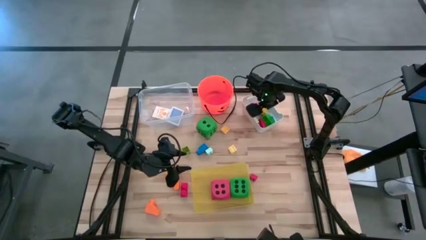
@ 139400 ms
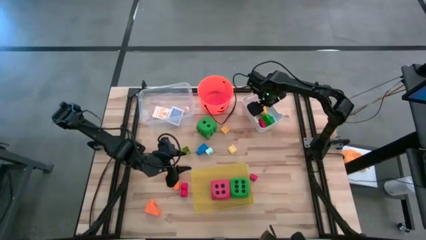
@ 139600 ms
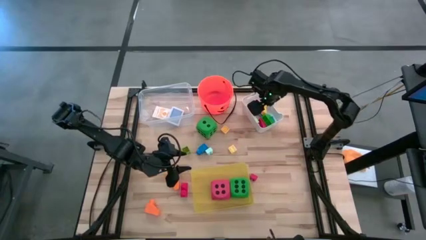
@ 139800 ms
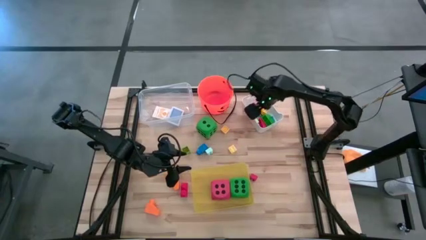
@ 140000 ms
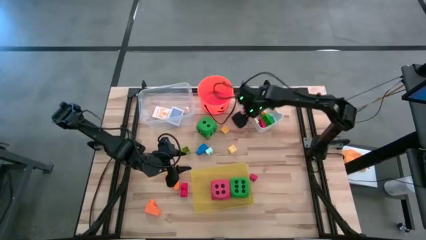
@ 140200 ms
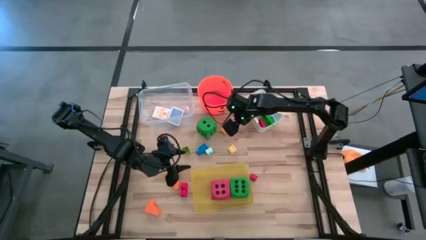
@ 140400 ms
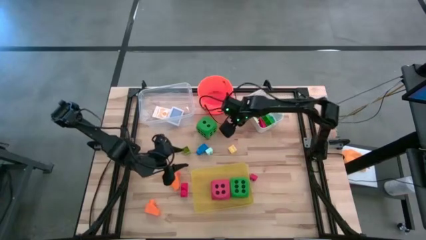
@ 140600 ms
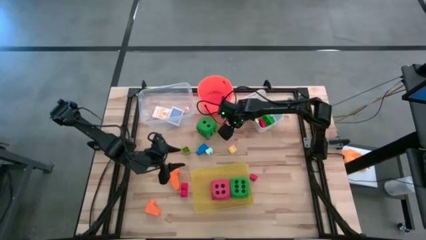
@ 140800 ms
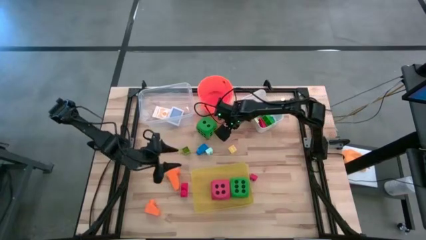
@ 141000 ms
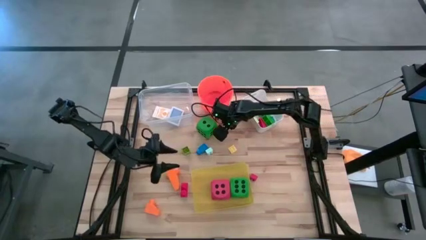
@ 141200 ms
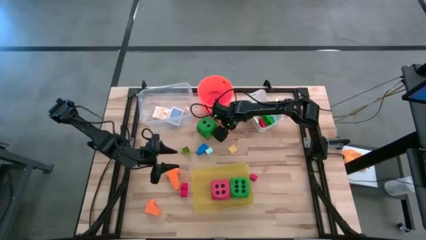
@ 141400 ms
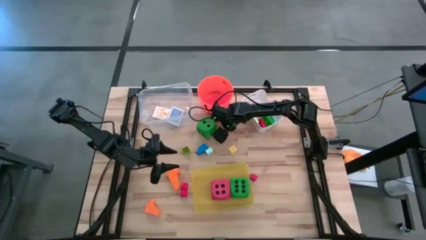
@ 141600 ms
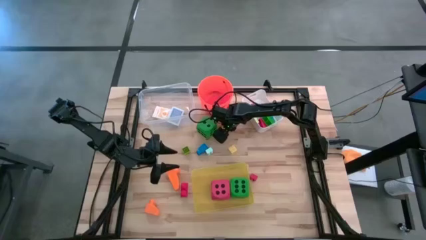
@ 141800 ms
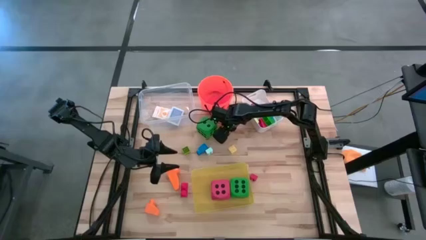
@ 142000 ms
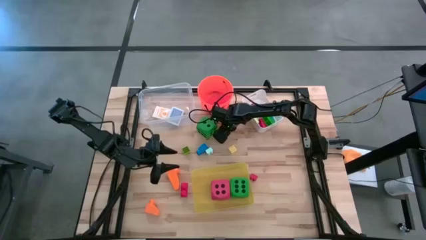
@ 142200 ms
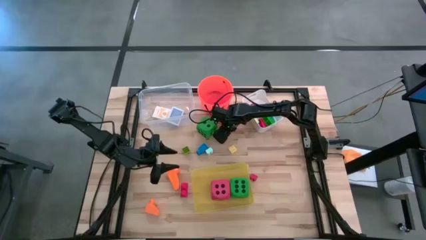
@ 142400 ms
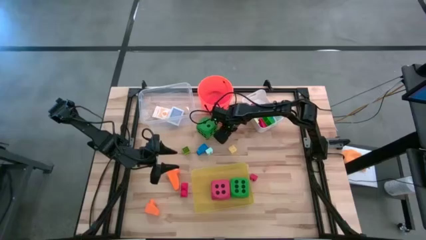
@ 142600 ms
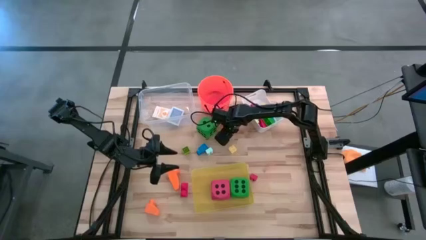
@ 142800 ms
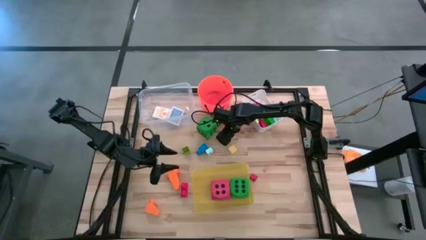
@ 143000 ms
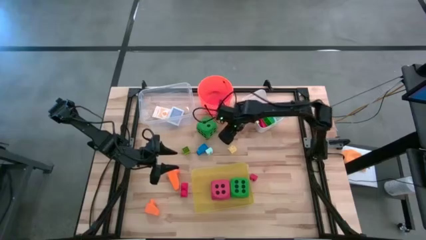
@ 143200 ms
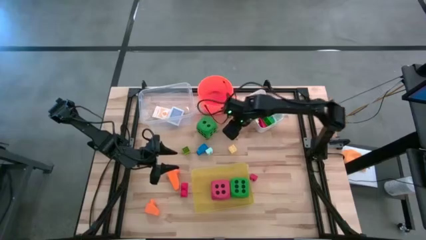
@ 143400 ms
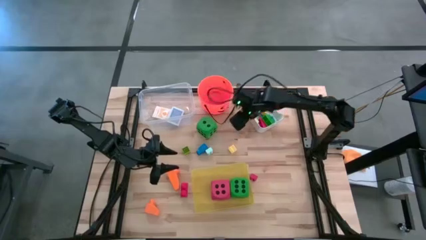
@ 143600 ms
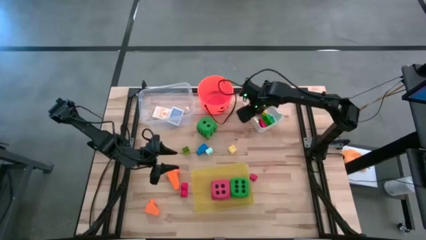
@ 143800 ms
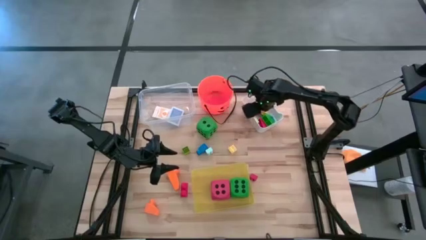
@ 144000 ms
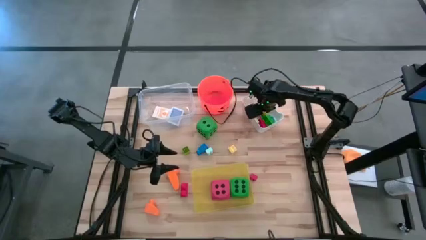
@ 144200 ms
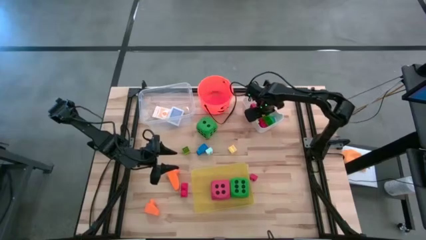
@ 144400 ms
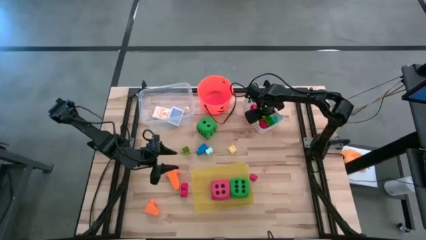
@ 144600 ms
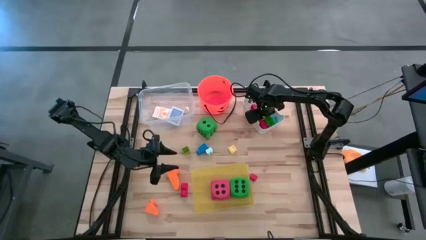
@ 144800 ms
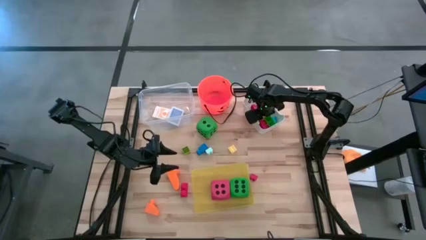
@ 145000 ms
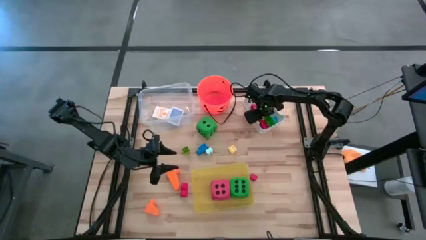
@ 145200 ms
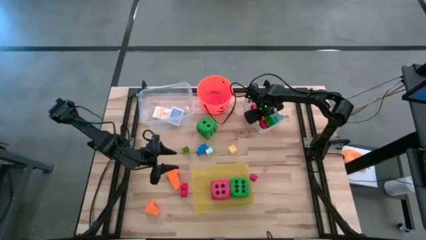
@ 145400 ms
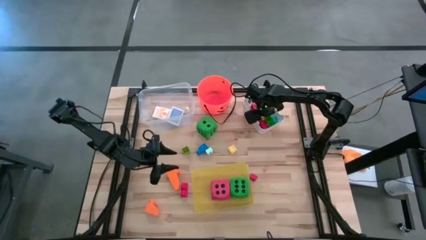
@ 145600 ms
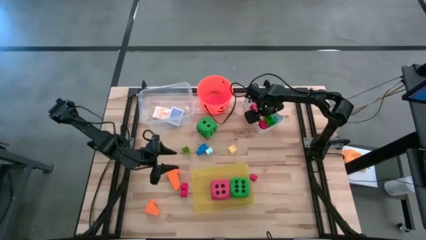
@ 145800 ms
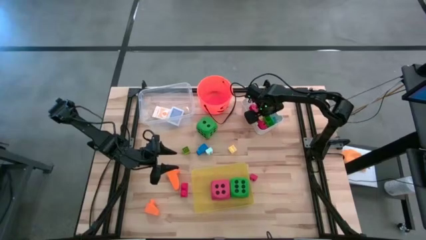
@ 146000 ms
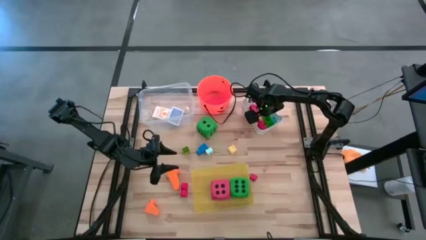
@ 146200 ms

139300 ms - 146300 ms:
Task: Pick & Place Toys
Put the light yellow game piece into the white bin

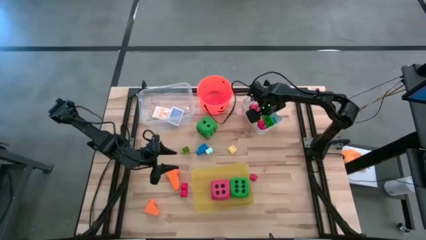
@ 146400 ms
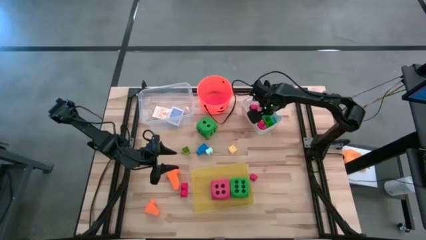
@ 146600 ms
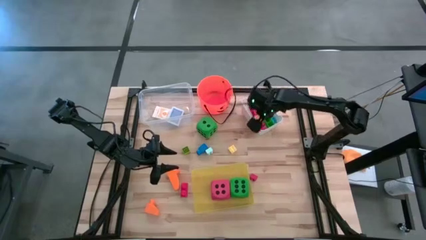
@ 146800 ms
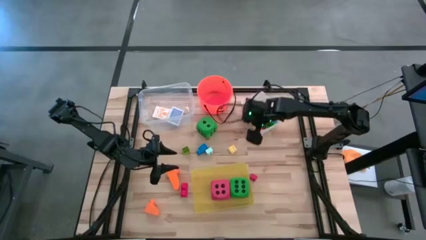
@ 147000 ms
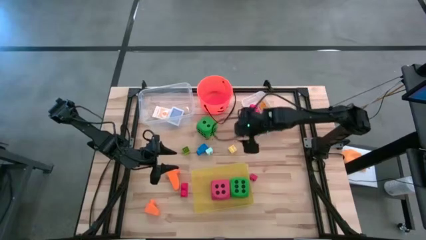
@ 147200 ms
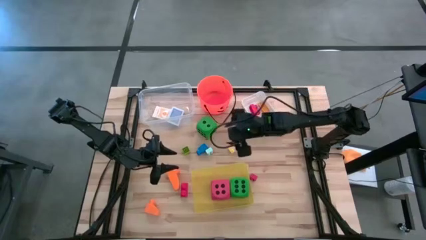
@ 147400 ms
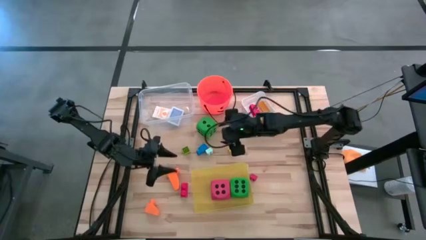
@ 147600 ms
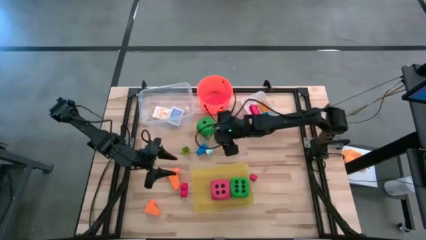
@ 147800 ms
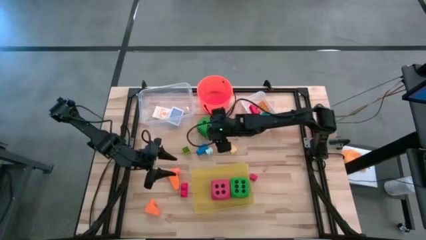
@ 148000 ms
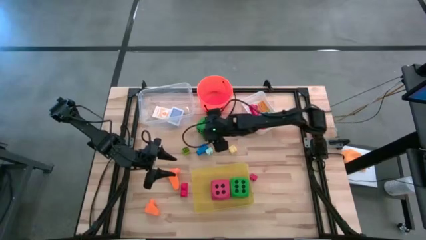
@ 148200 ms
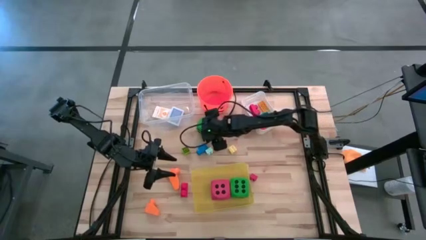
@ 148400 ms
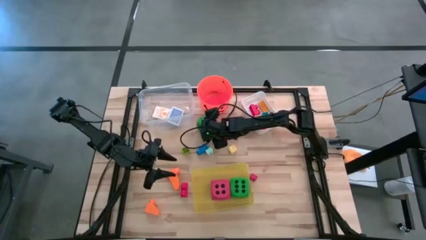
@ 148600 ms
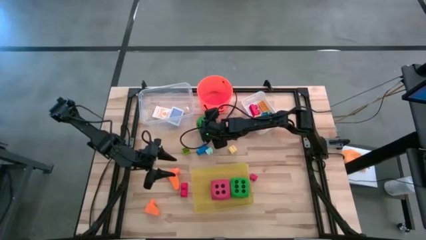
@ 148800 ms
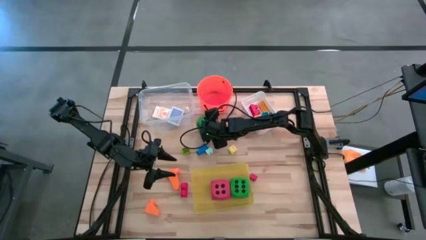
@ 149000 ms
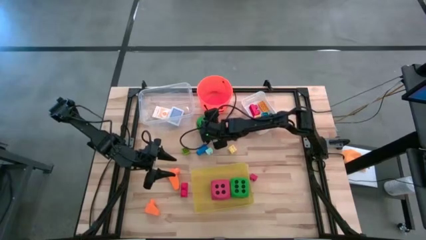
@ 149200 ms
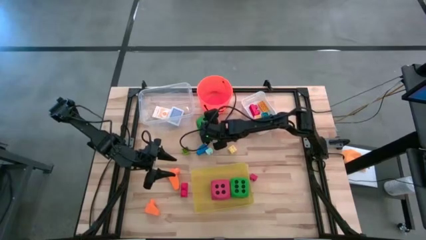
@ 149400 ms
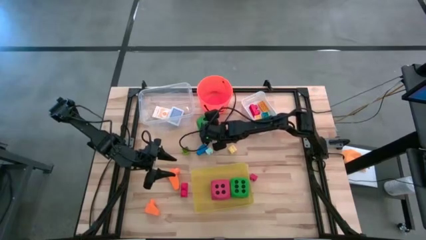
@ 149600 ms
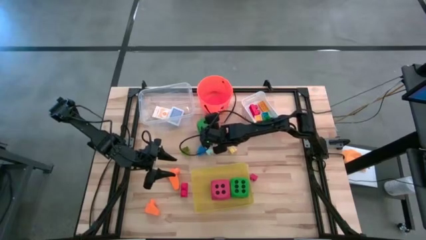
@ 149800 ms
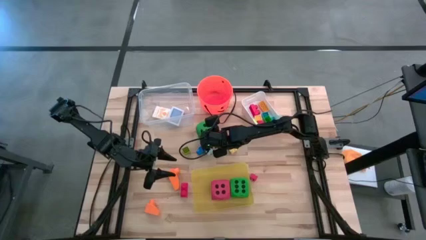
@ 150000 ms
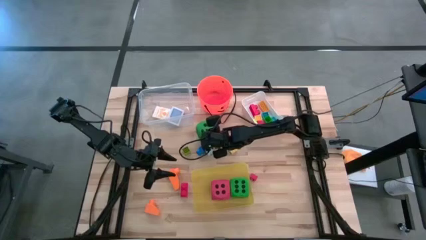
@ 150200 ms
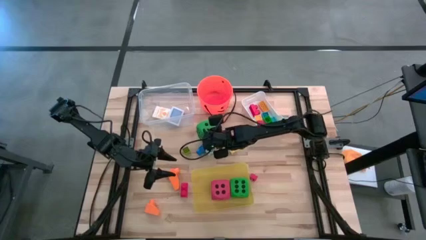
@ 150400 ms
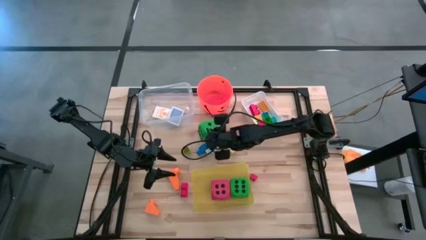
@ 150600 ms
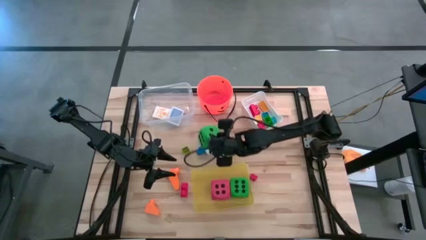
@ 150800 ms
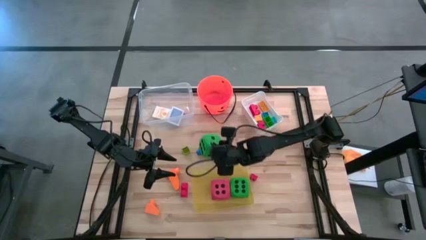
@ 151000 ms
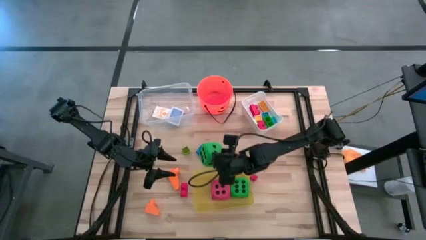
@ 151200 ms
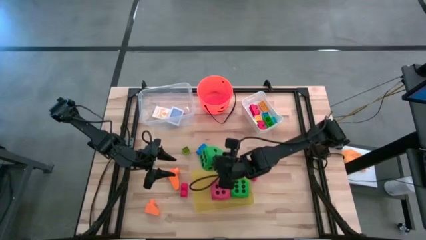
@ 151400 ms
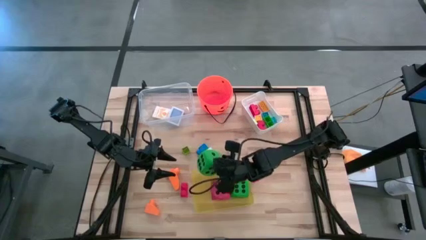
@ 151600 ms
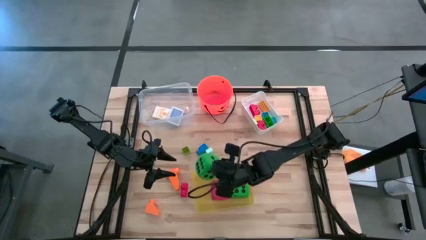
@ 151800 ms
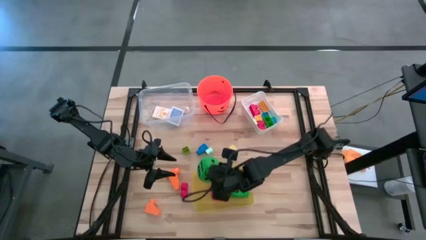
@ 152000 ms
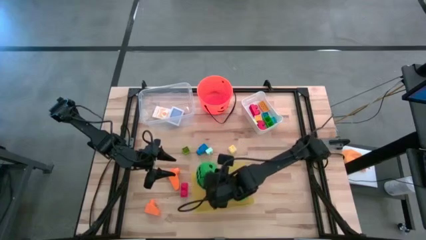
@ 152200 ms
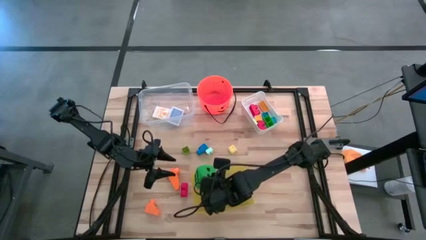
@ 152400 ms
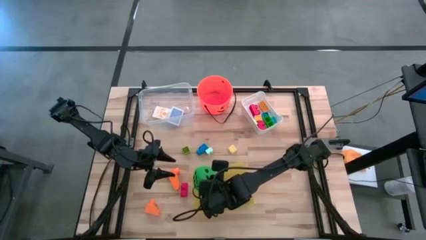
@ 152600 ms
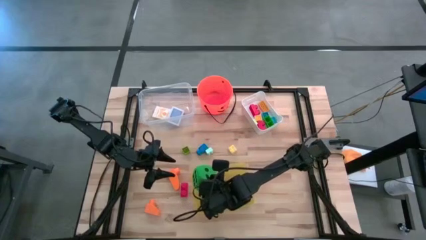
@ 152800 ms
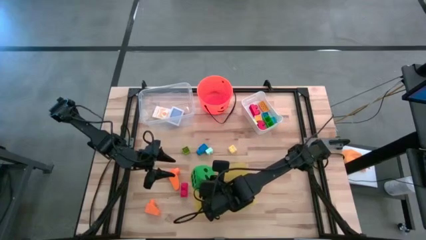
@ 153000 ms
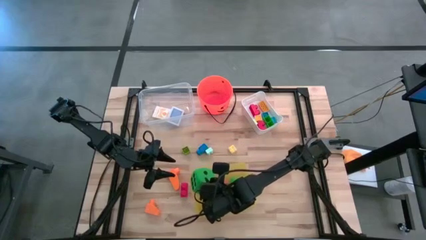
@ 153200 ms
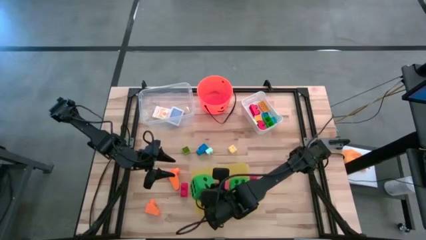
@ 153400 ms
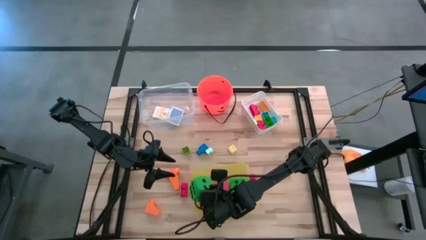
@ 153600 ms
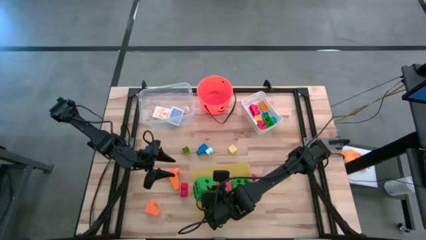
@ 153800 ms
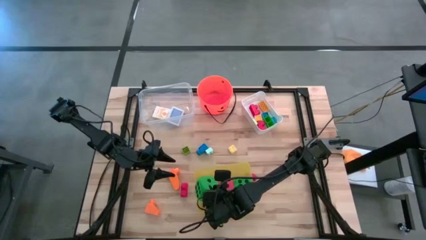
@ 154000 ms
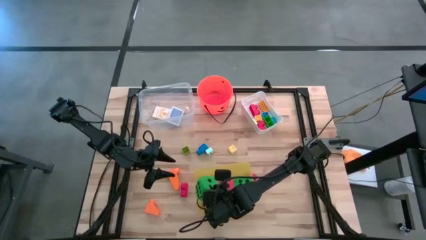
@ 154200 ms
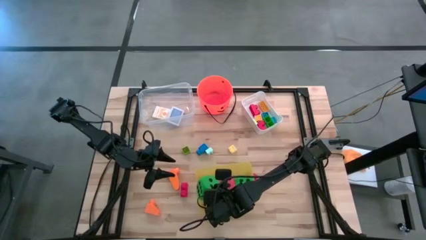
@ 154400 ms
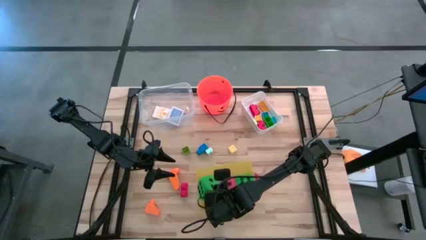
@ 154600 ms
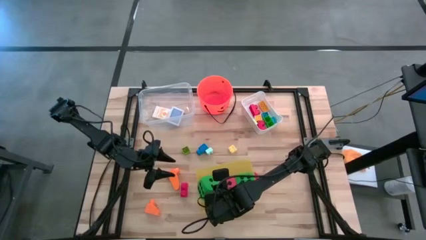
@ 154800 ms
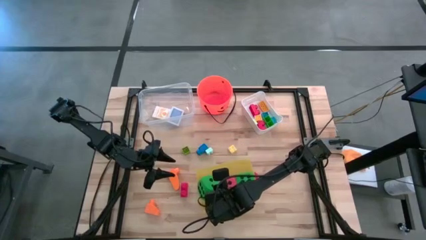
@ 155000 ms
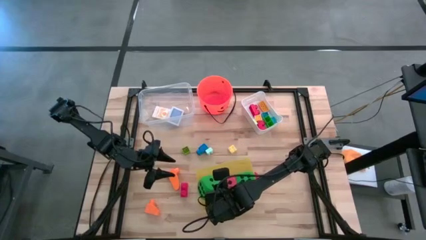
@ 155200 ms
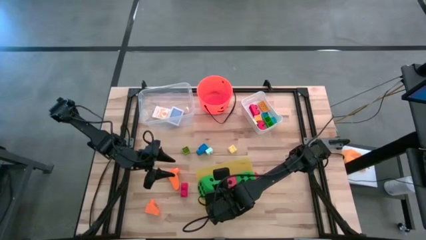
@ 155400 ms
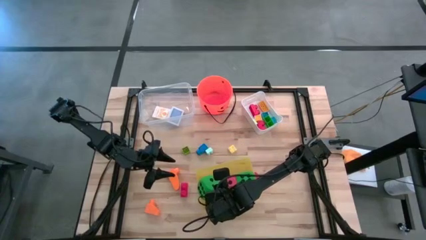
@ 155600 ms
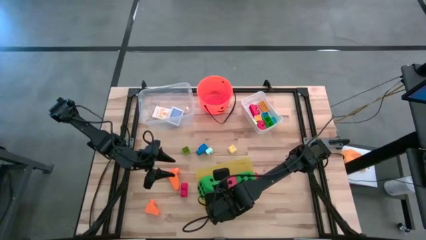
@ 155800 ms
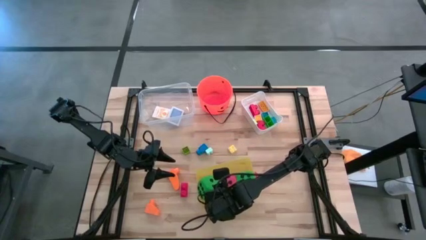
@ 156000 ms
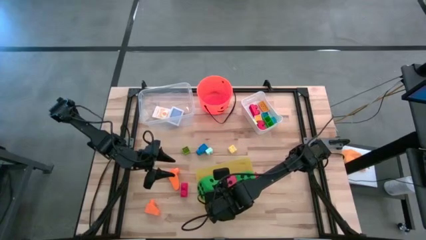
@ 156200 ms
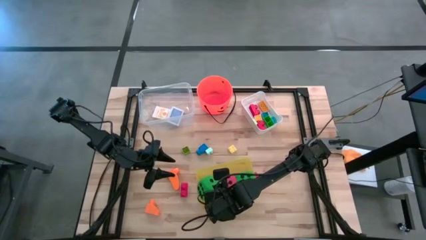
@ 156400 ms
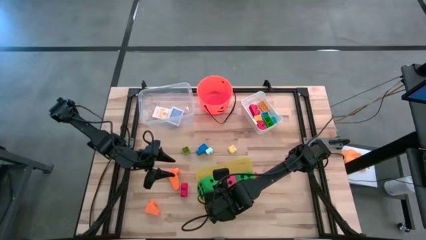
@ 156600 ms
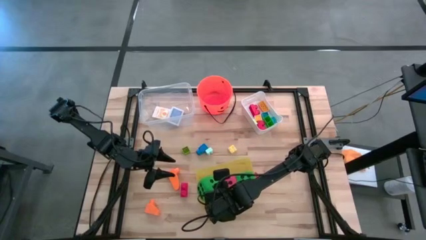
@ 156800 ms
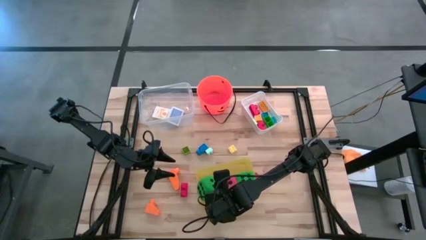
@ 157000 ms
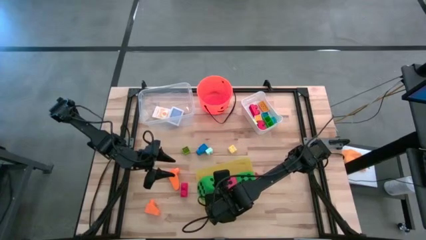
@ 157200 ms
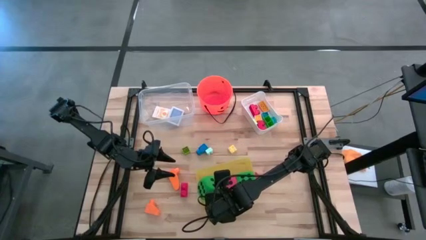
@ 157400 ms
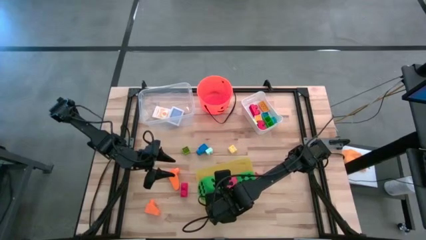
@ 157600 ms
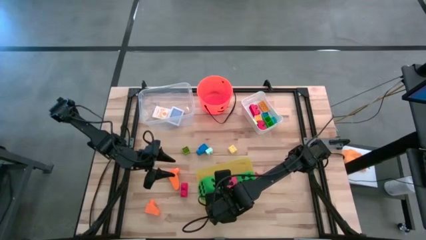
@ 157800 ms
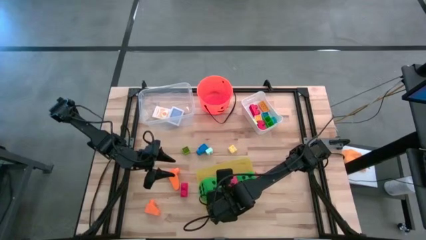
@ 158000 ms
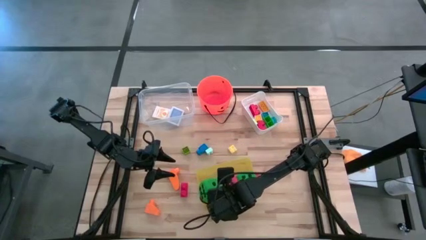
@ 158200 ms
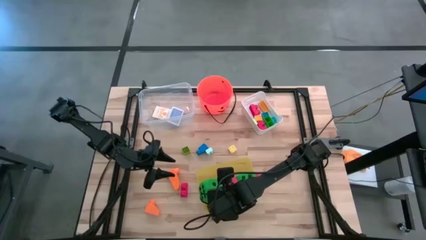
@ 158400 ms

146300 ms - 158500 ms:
Put the green die into the yellow bin
